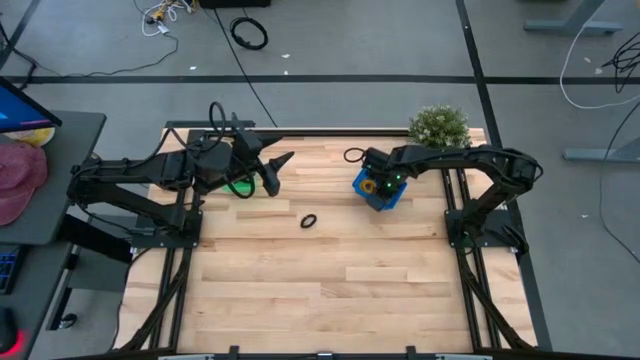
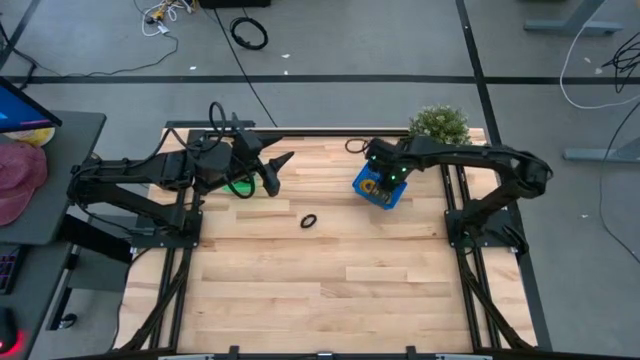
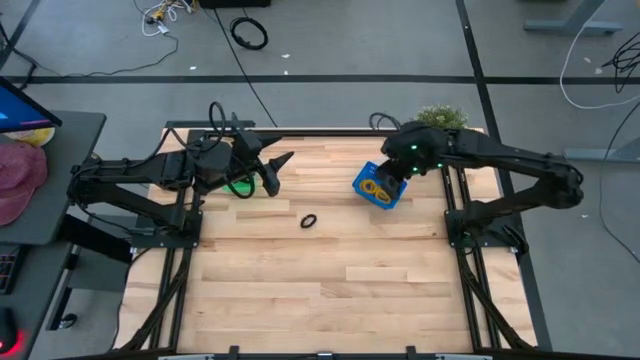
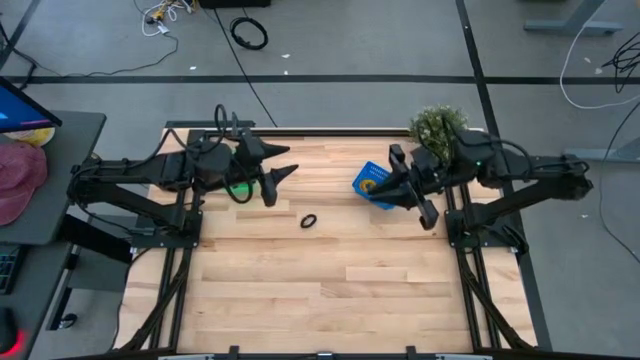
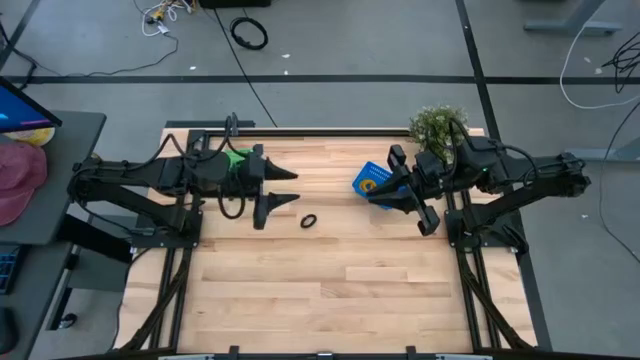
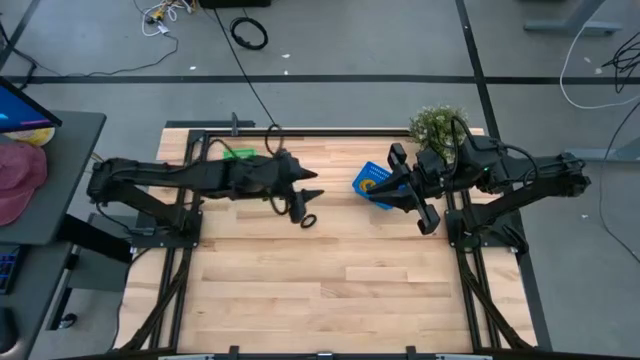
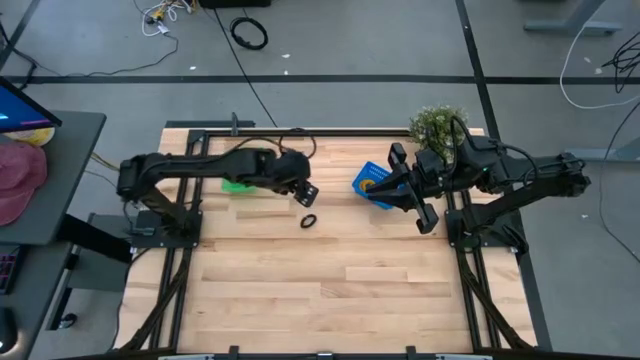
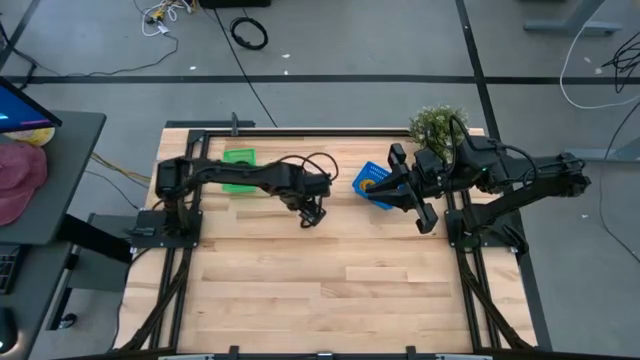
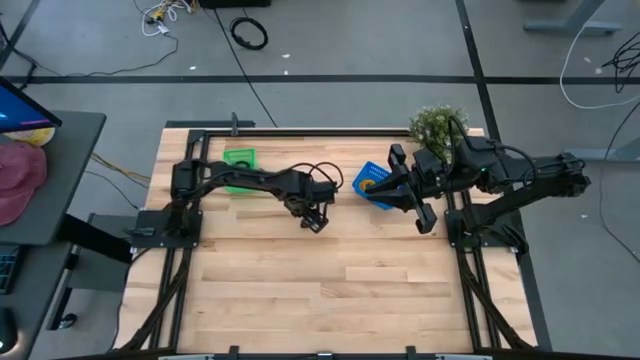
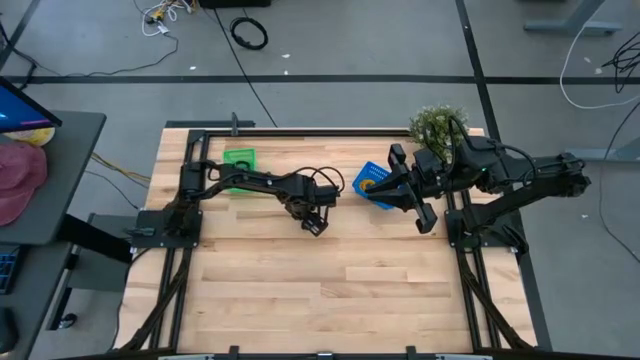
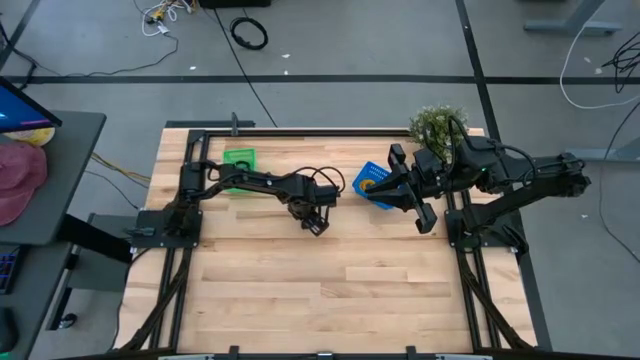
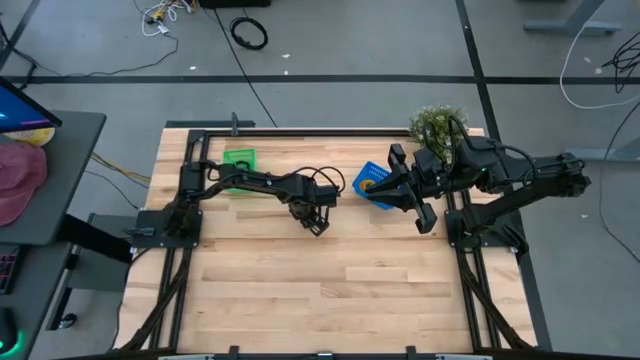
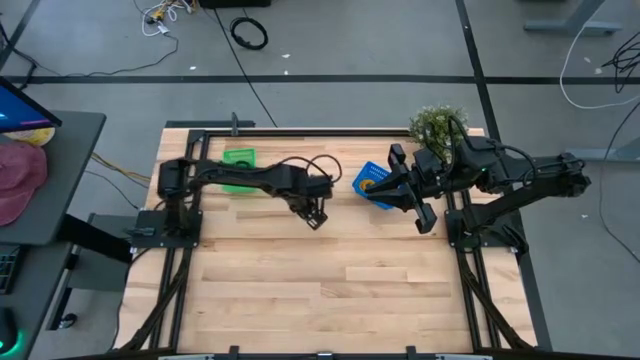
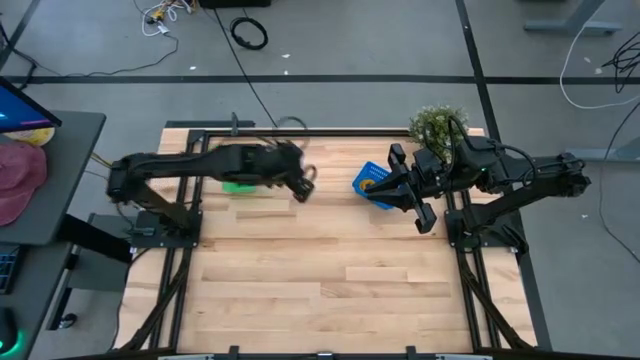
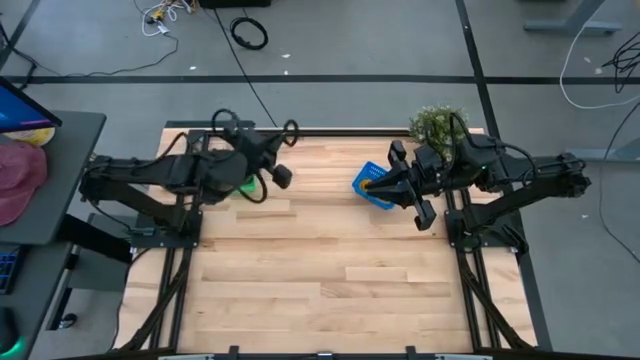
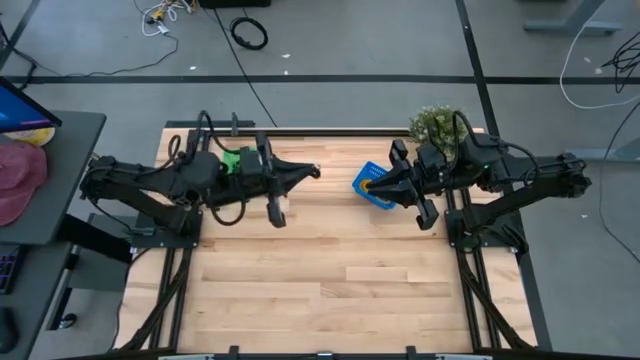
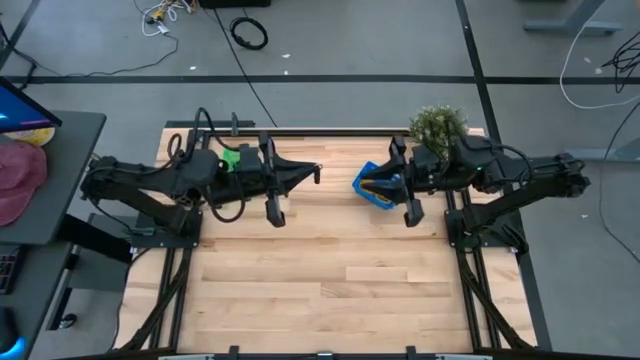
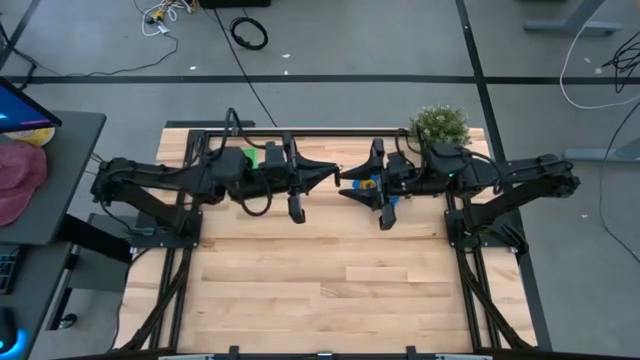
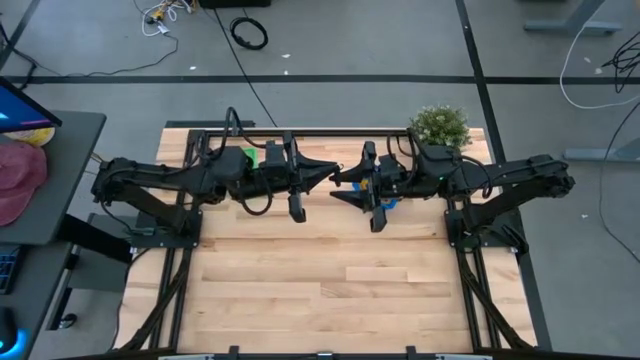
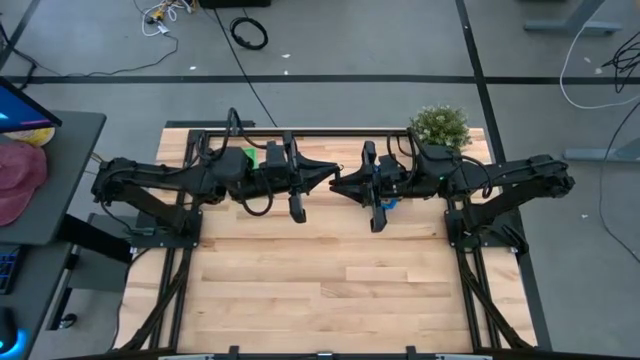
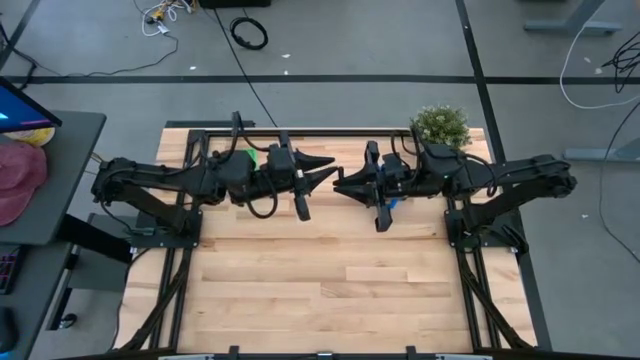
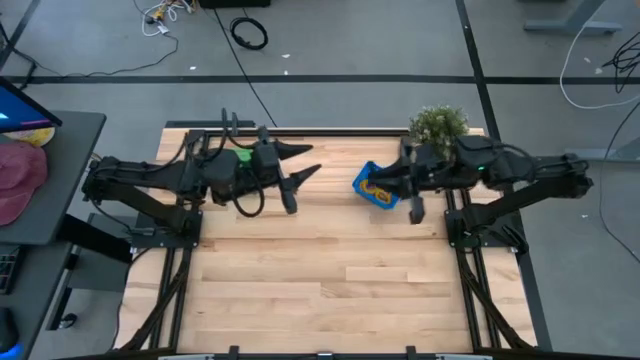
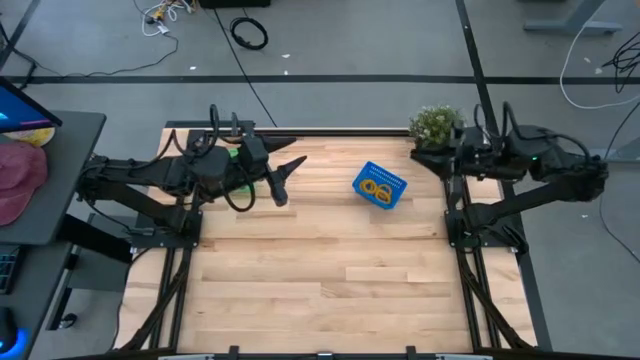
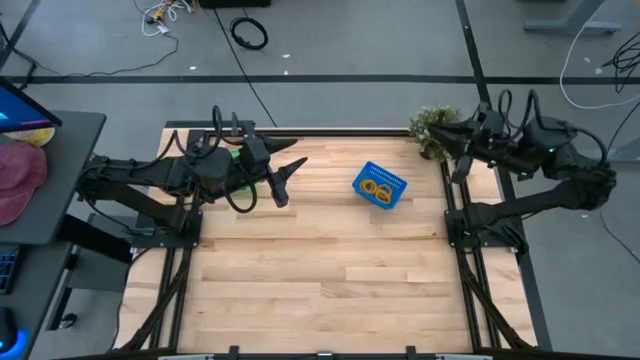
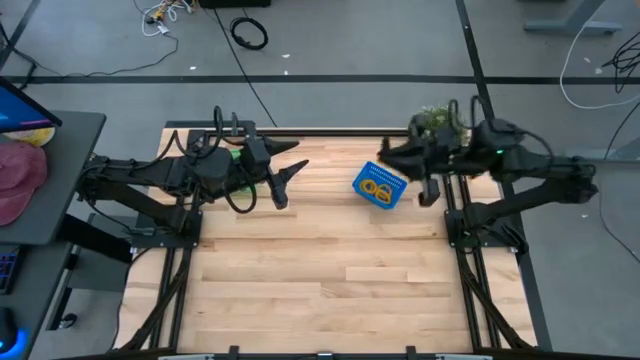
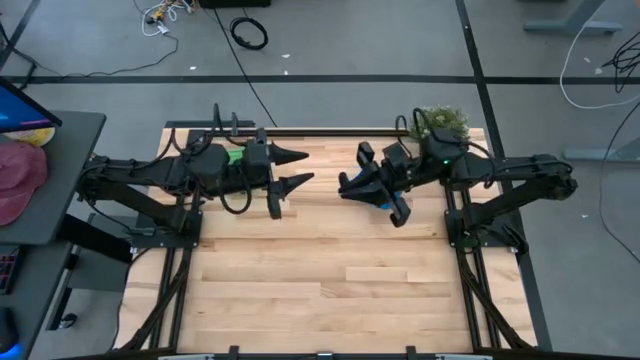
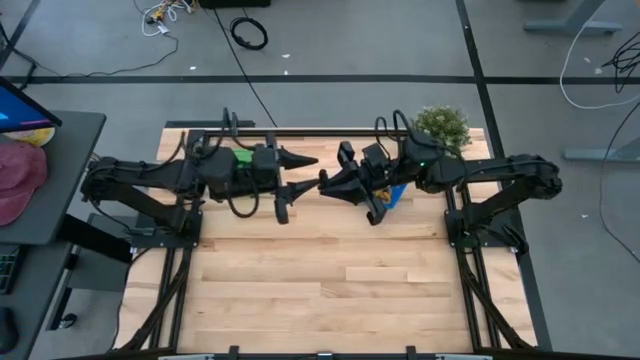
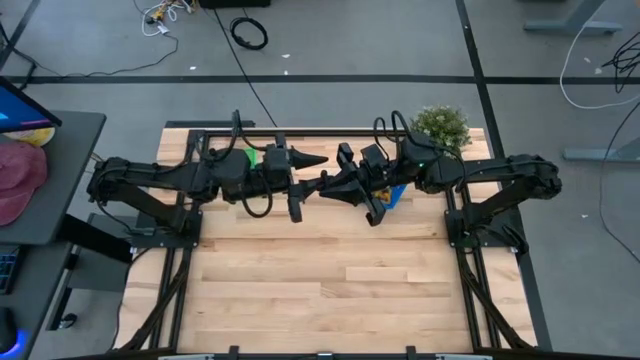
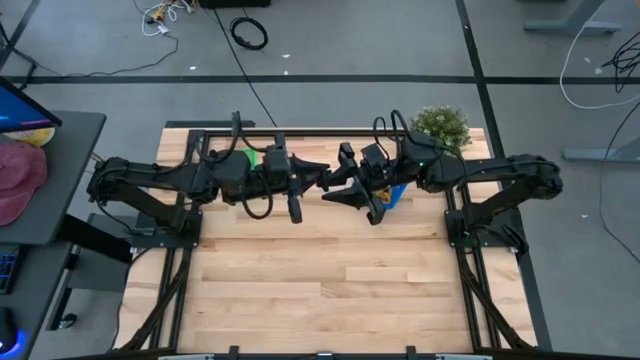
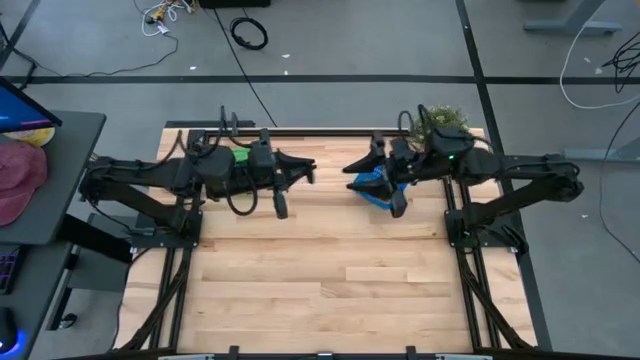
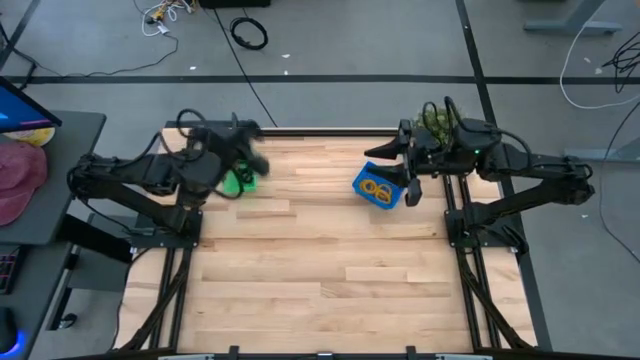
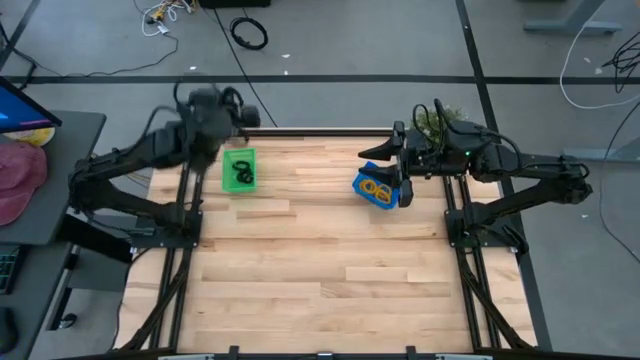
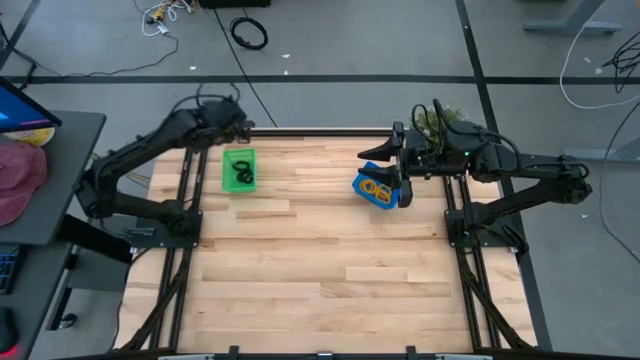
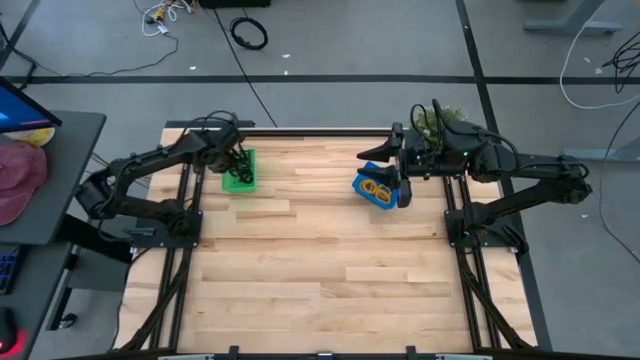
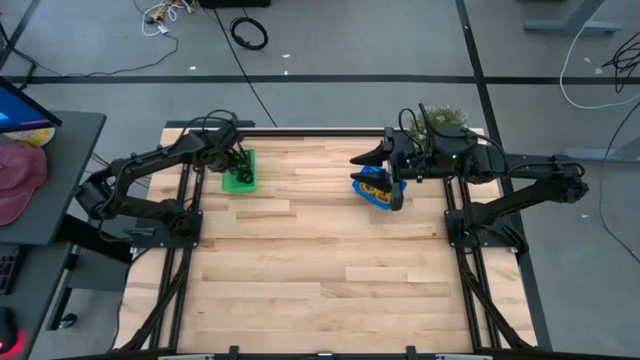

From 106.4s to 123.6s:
Task: Sort spring keychains
Put the black spring keychain into the green bin

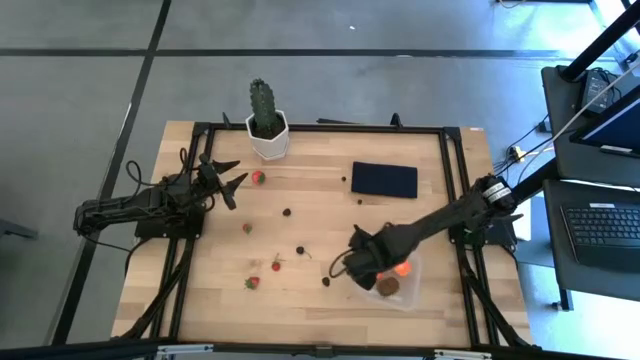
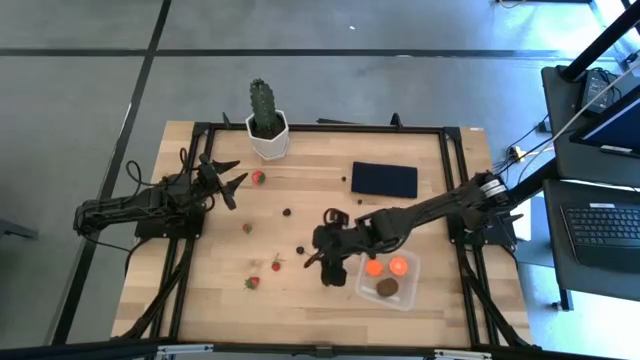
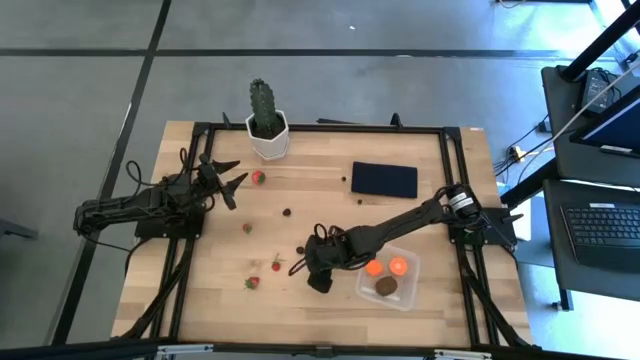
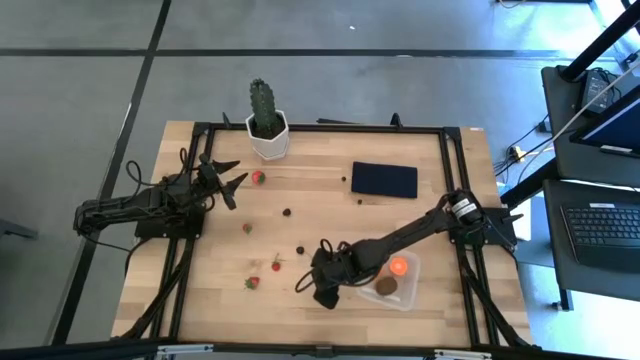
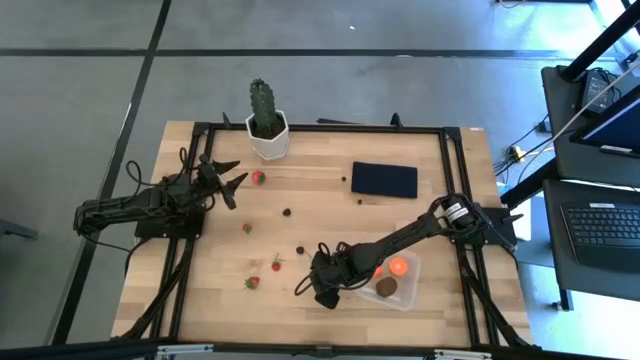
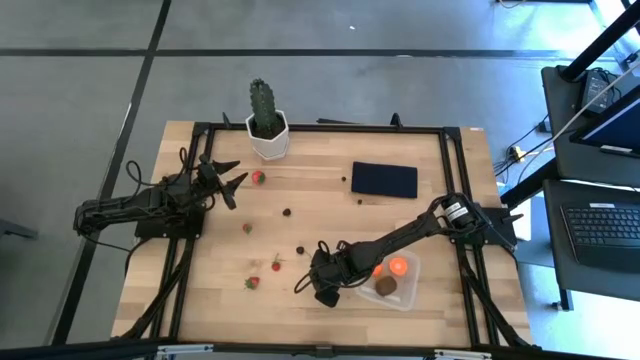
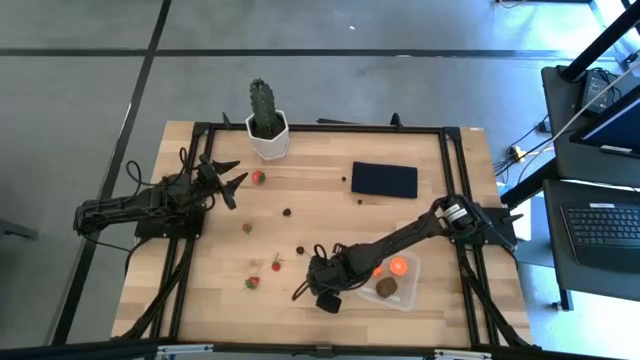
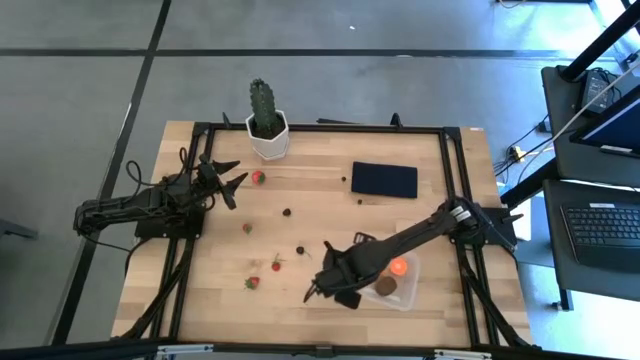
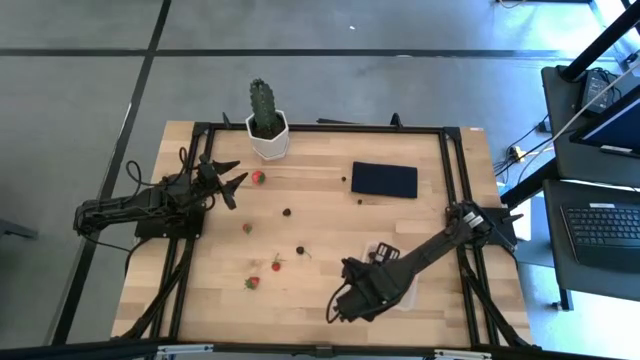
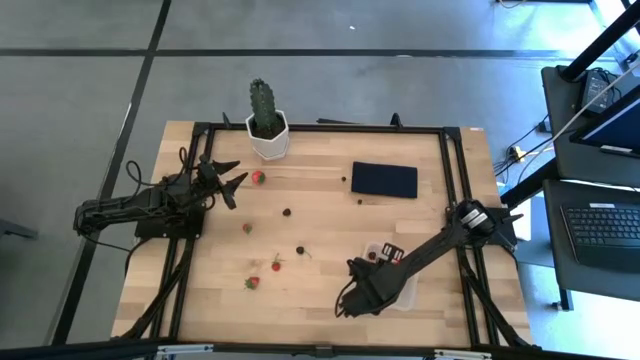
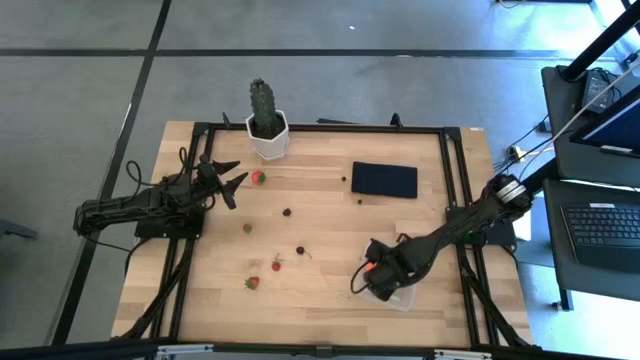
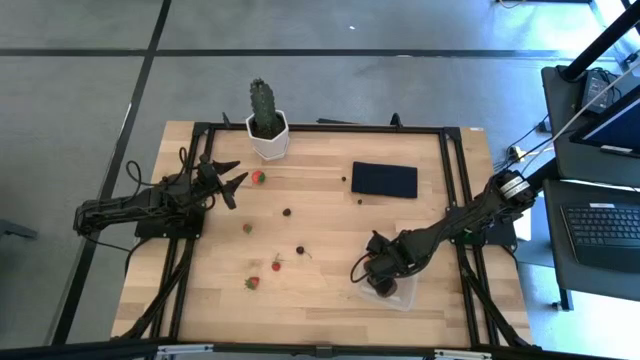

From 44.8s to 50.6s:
Task: Pick and placing Produce into tupperware
Put the bottom blackberry into the transparent bin
